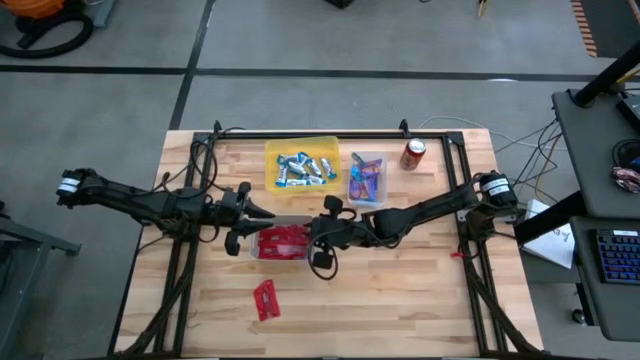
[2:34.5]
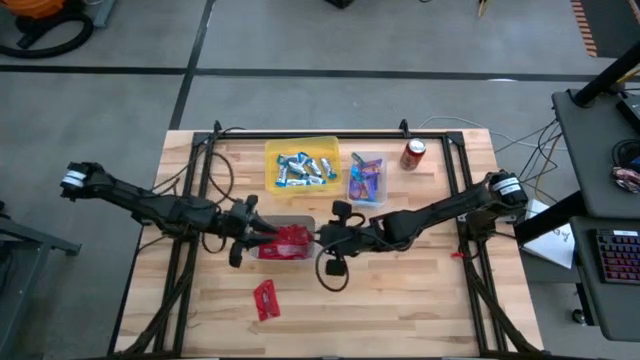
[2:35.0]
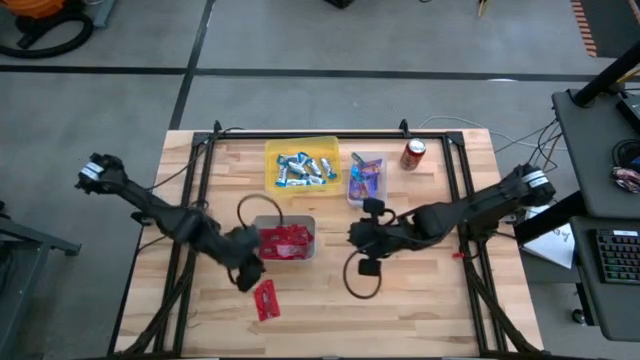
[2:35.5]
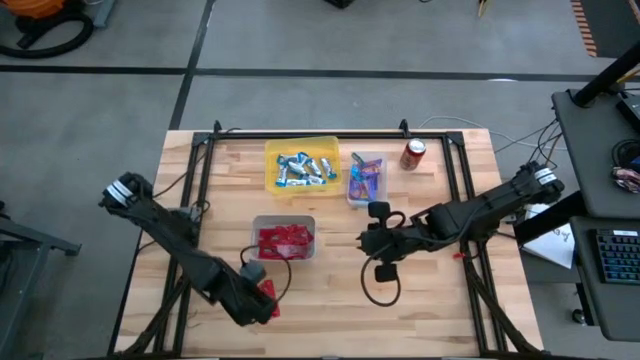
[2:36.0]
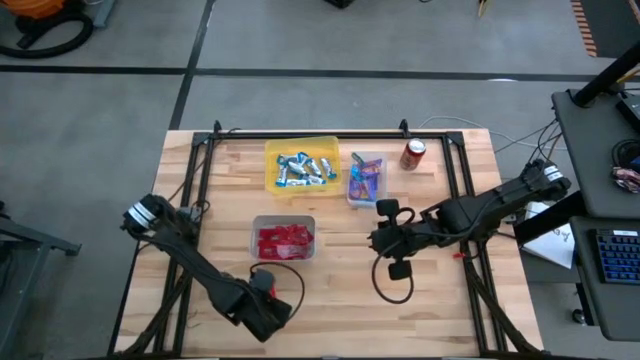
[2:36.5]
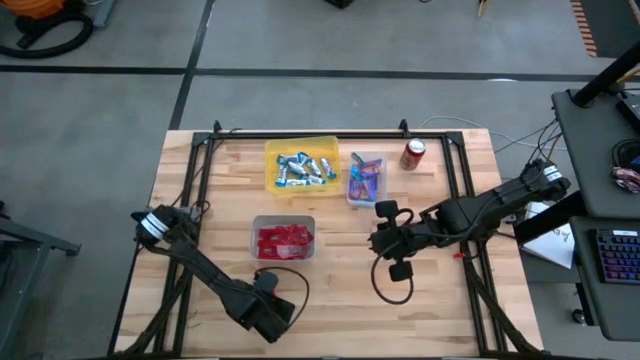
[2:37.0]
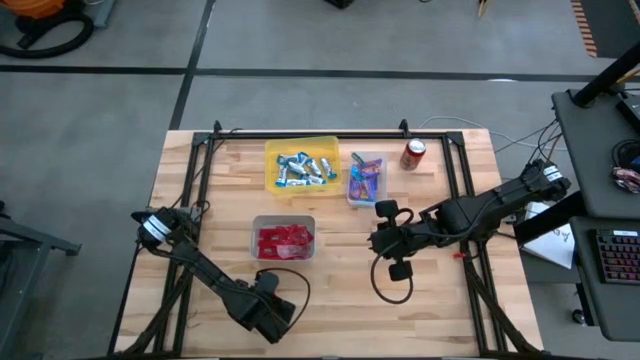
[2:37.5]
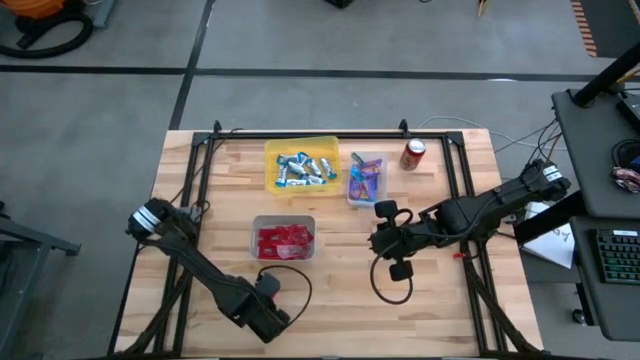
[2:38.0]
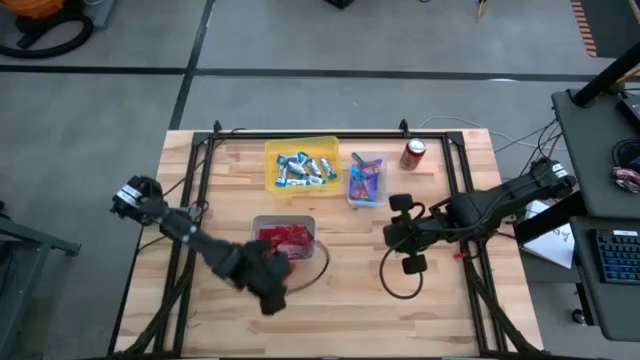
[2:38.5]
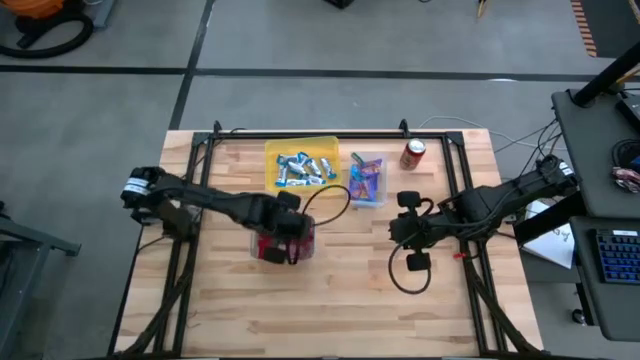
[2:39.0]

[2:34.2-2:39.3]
Task: Sort candy
Put the red candy into the gray bin

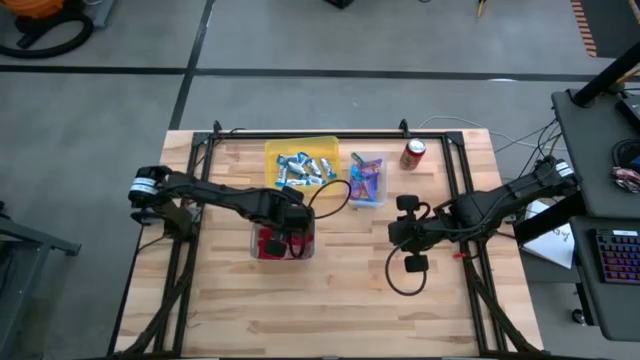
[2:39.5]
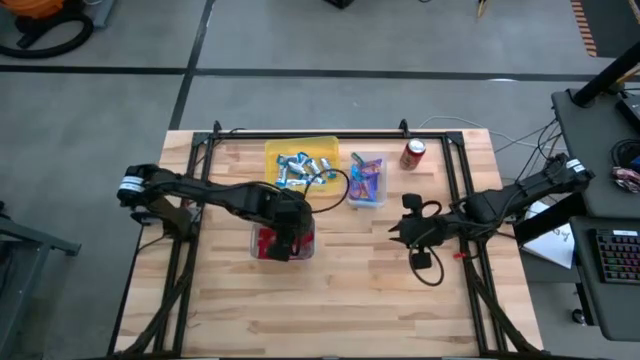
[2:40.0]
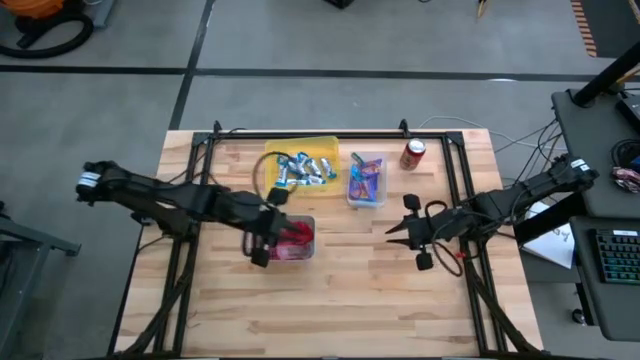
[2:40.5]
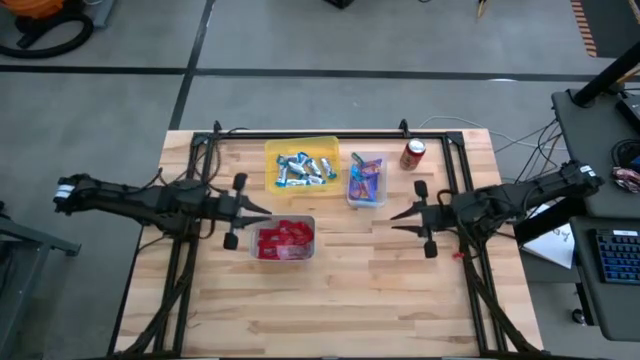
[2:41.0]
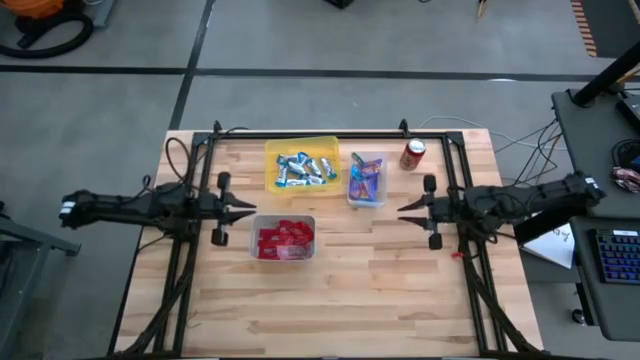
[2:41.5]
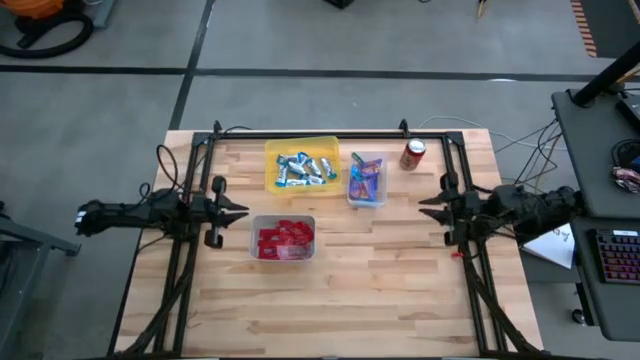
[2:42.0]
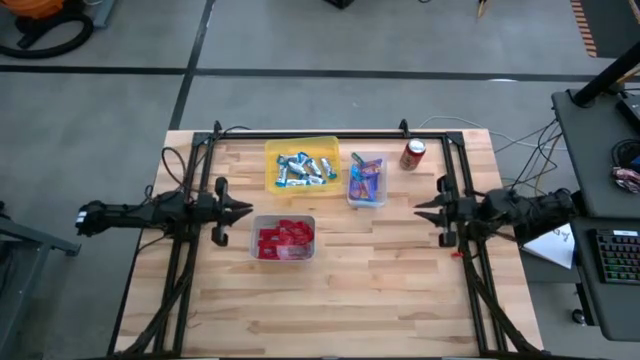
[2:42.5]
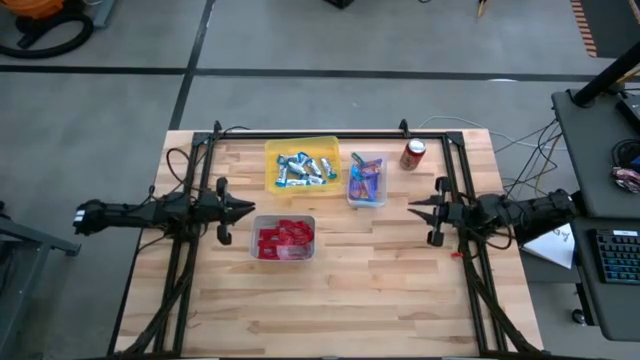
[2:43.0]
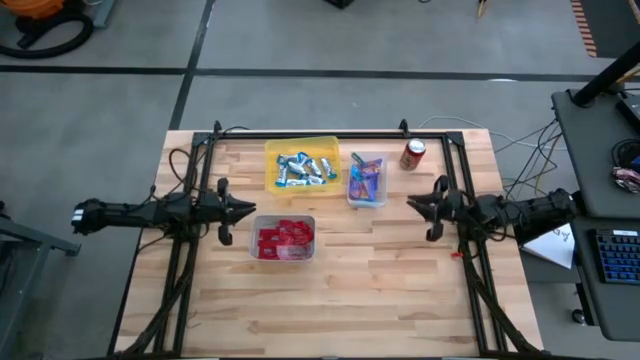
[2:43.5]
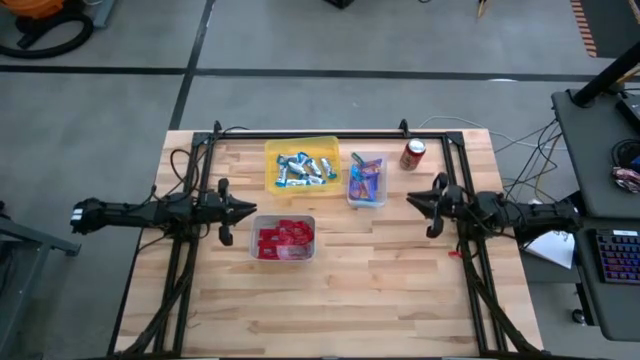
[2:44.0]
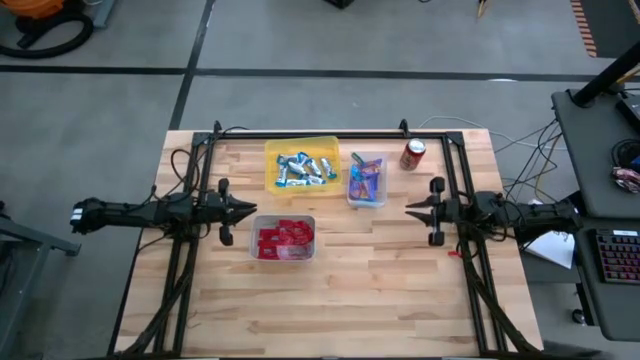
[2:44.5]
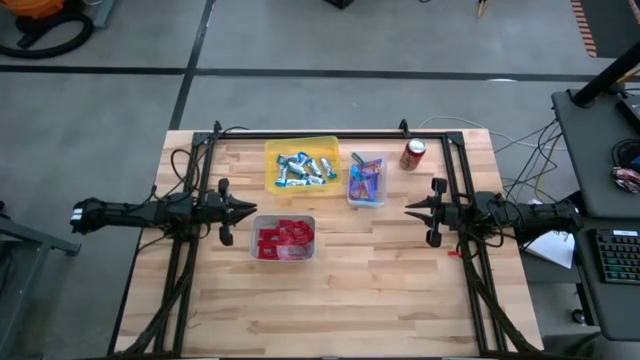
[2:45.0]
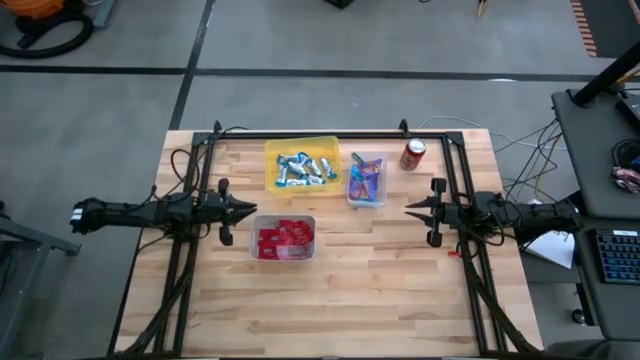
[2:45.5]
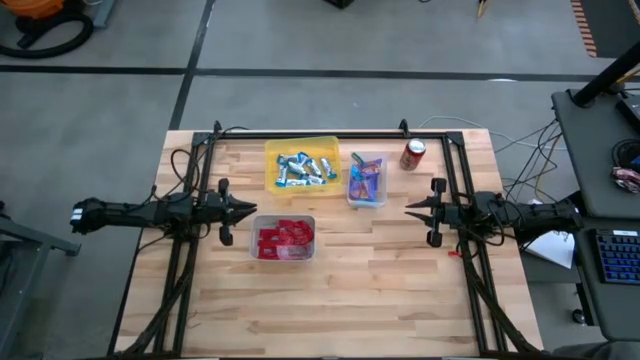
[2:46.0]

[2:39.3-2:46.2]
Return to Home Position

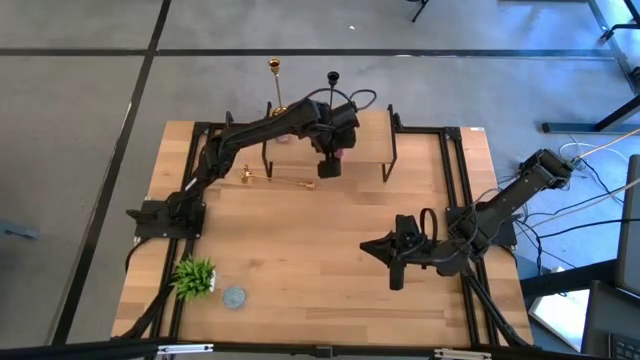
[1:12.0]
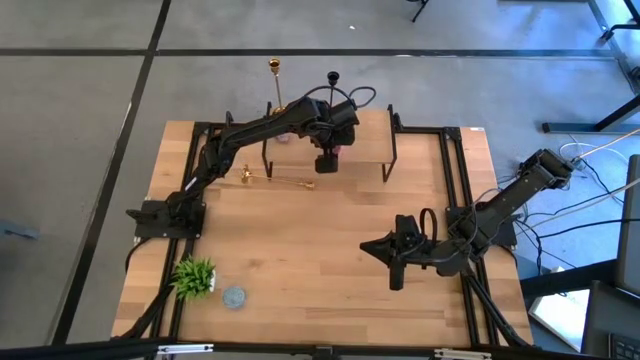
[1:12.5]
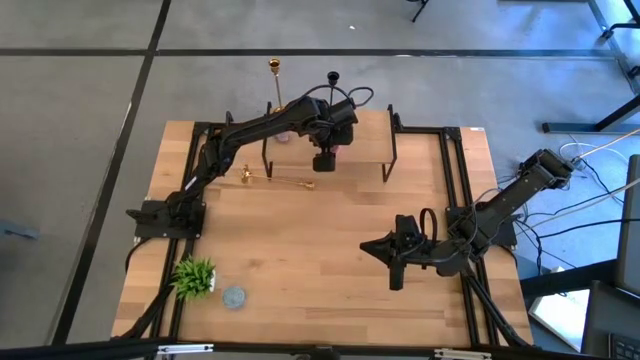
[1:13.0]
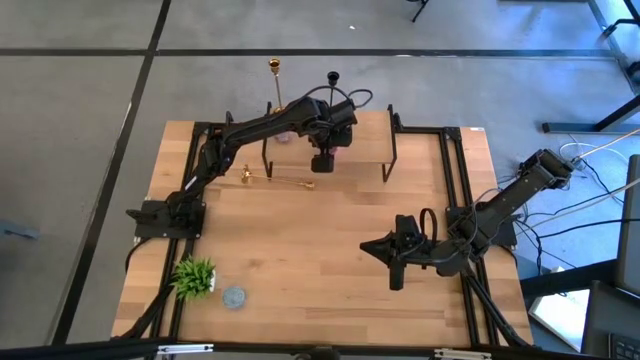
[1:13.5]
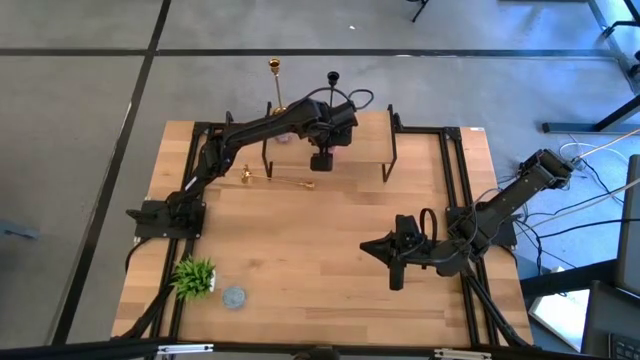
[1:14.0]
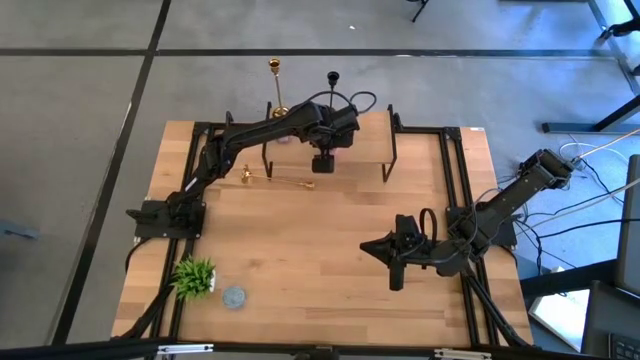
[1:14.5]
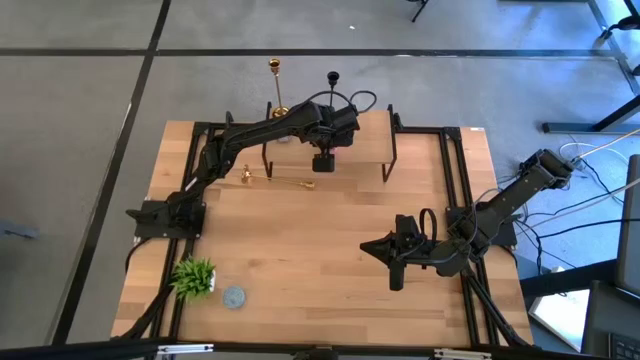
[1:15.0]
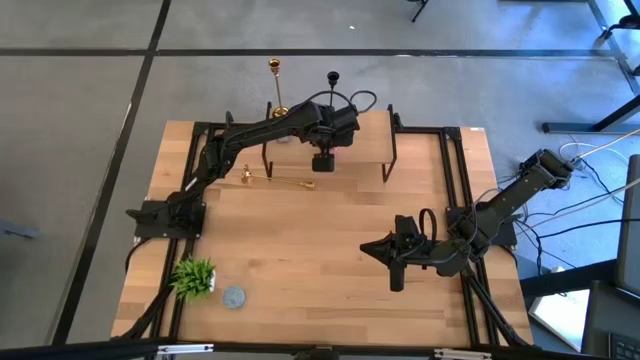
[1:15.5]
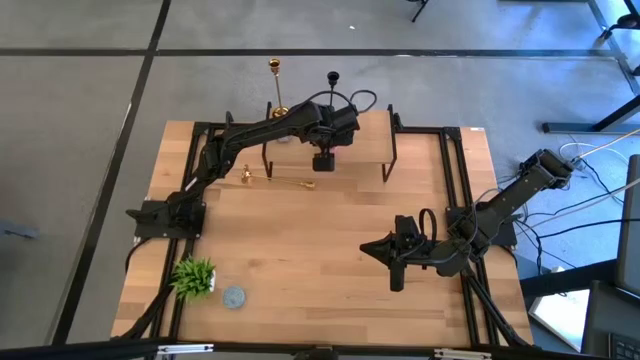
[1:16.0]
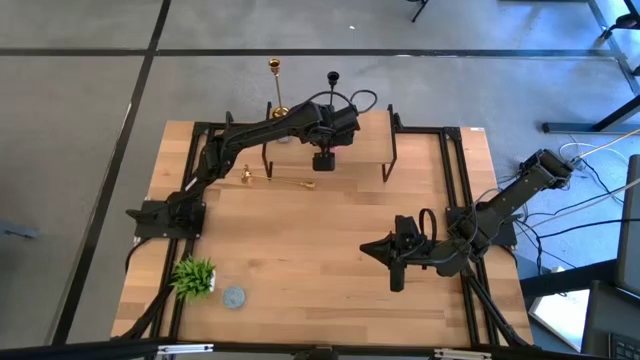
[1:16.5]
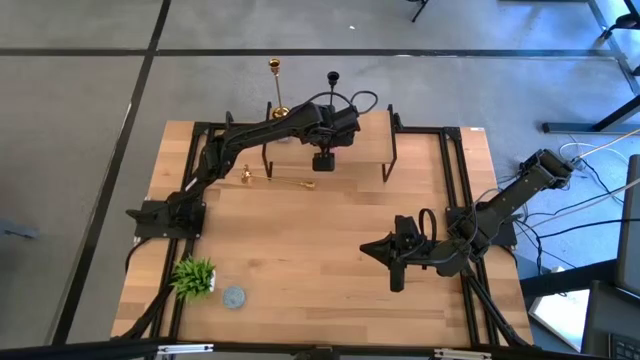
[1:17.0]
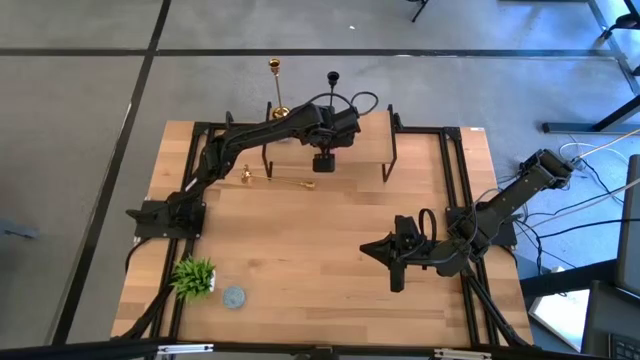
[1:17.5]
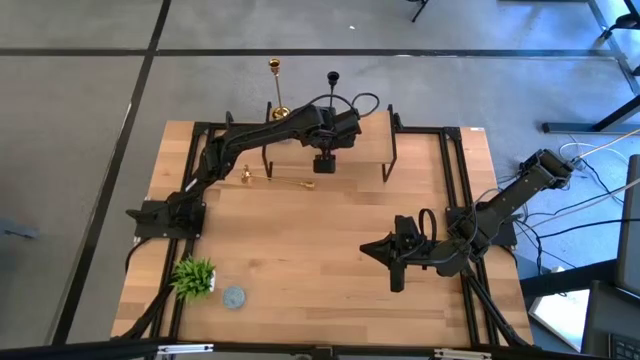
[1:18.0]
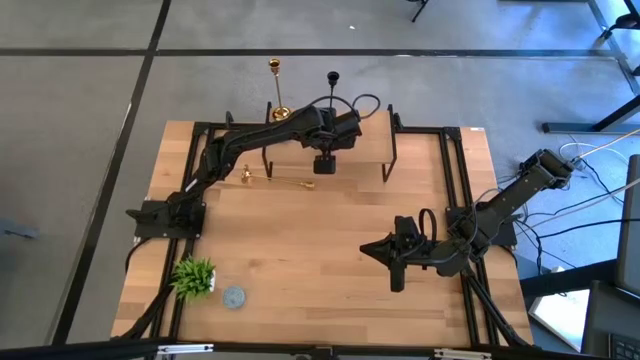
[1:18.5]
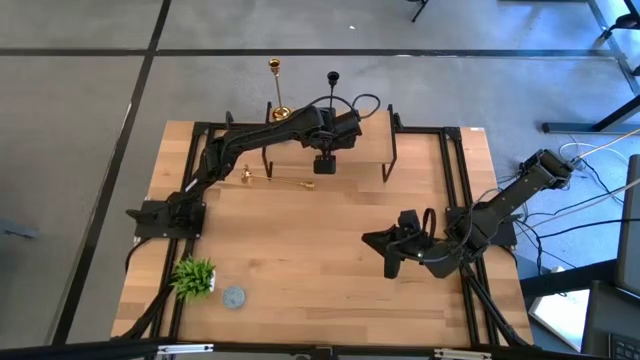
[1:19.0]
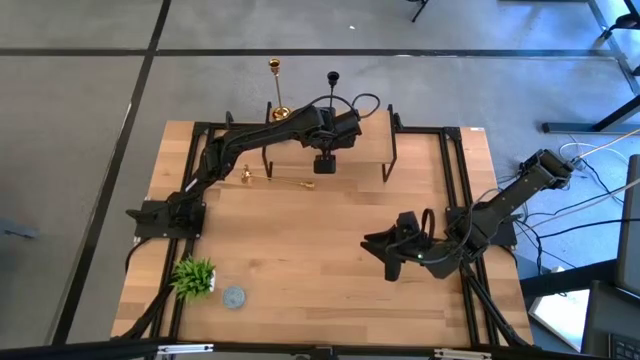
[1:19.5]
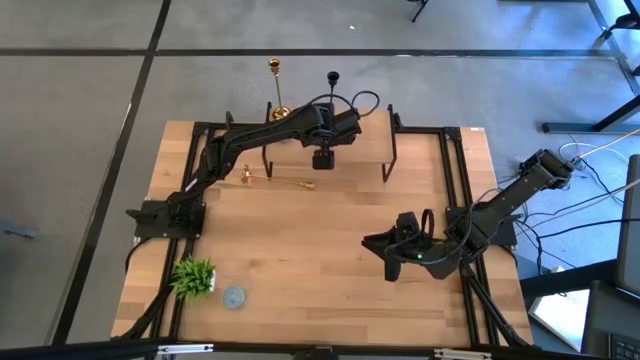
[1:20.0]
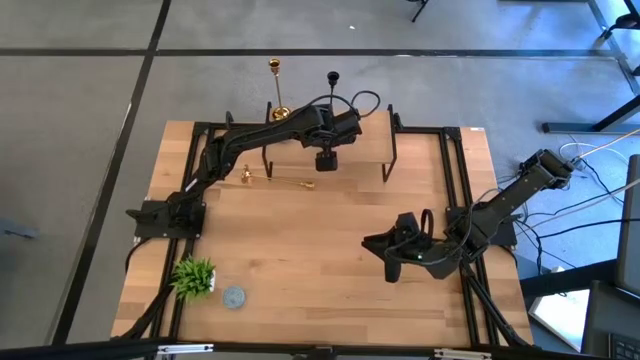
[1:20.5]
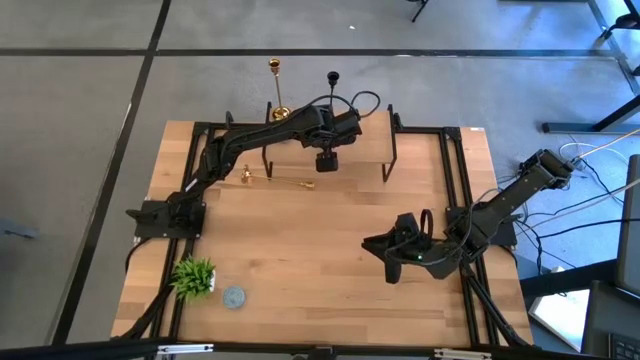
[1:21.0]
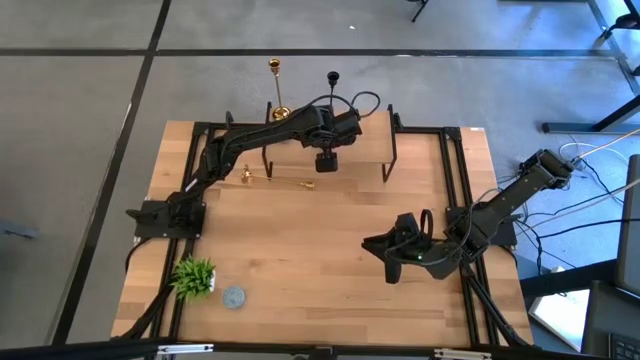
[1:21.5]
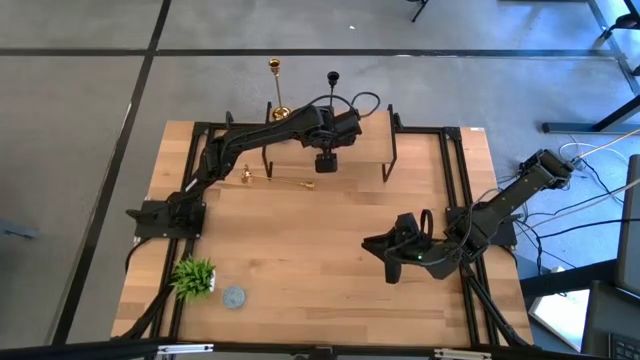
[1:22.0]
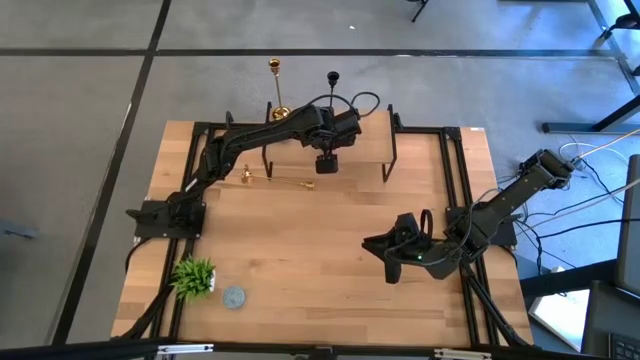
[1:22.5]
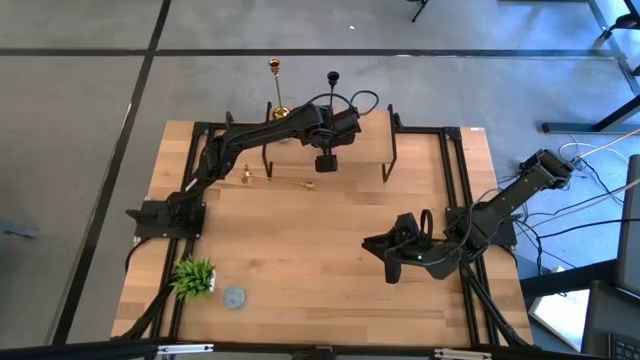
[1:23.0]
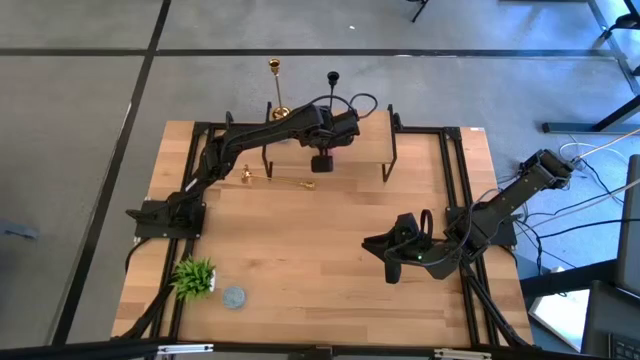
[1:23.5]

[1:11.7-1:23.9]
Task: Pick & Place candle stick holders
Put the pink scented candle on the shelf
